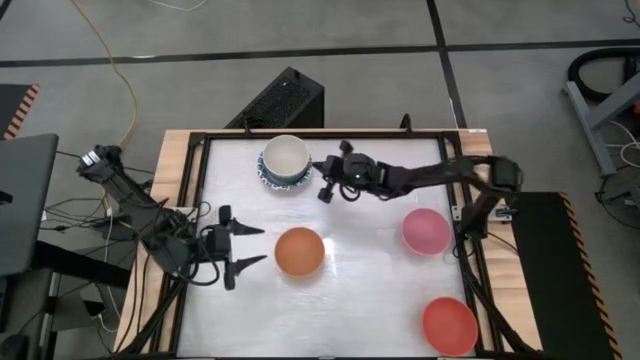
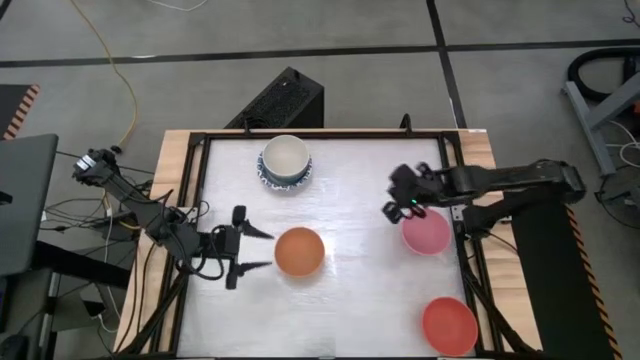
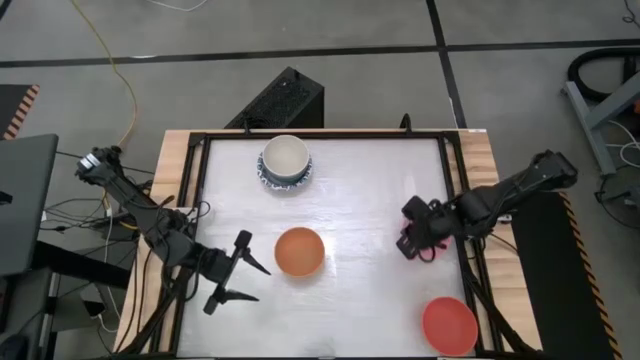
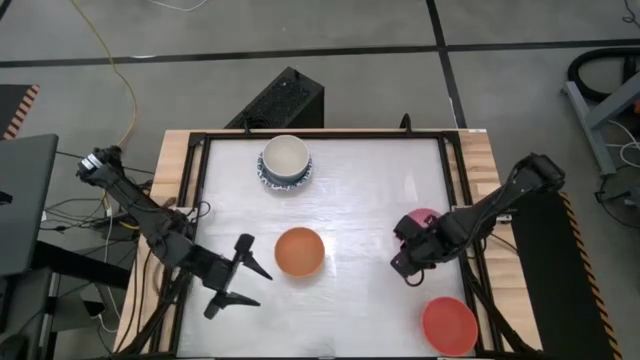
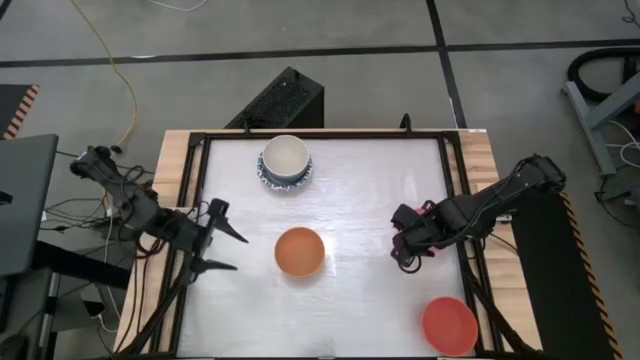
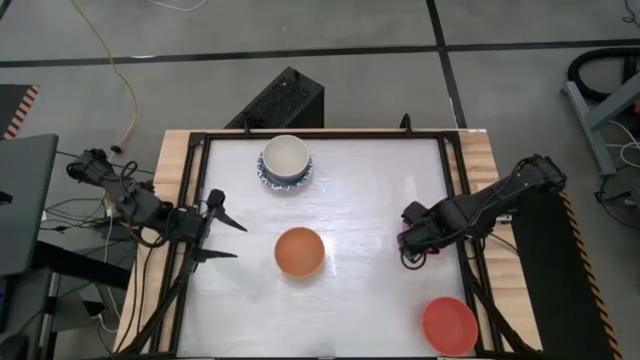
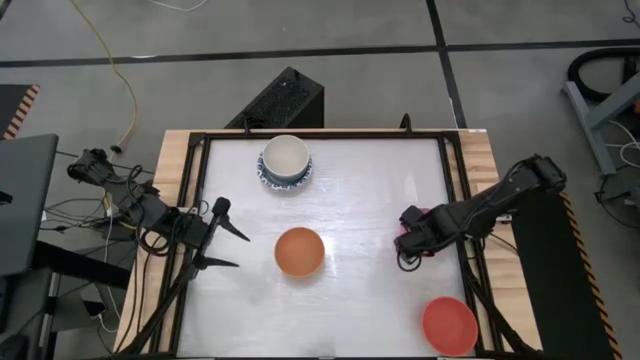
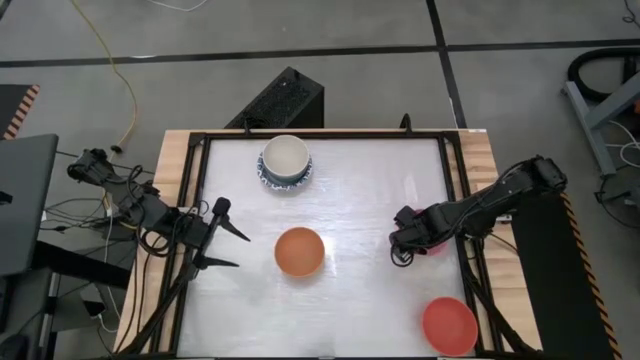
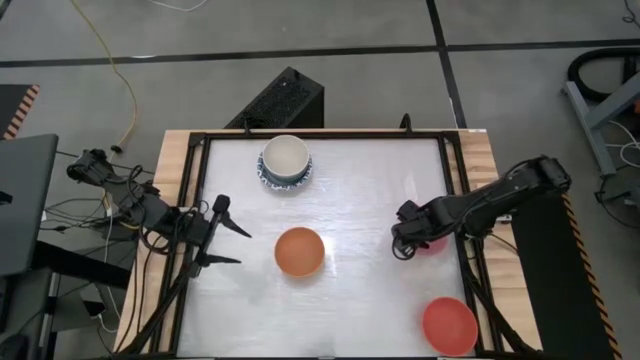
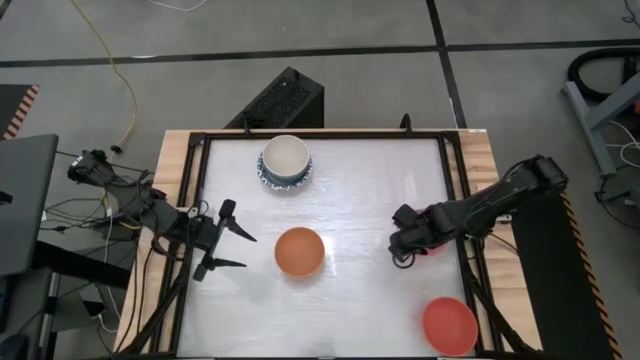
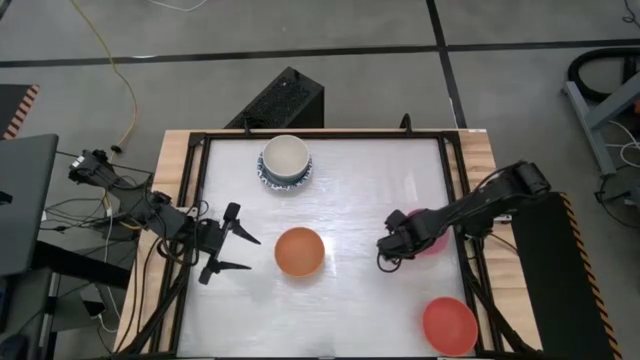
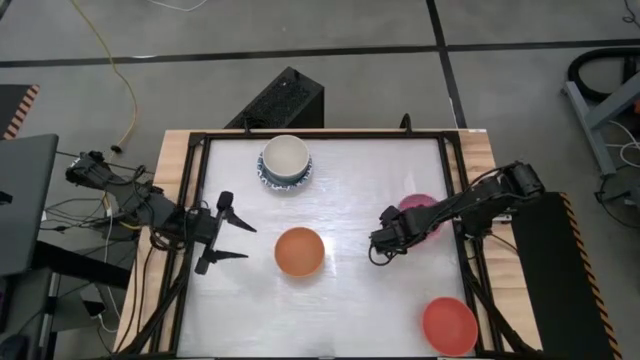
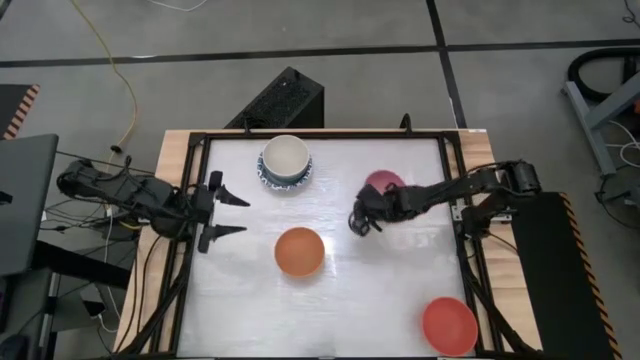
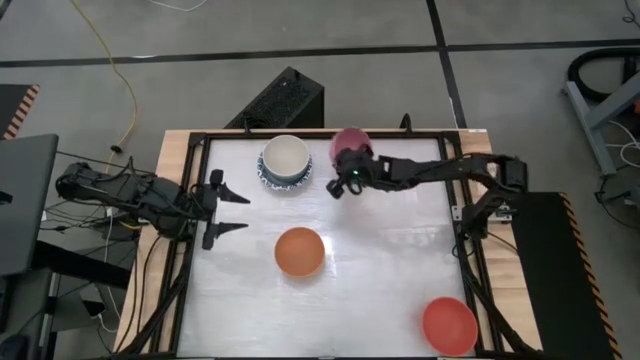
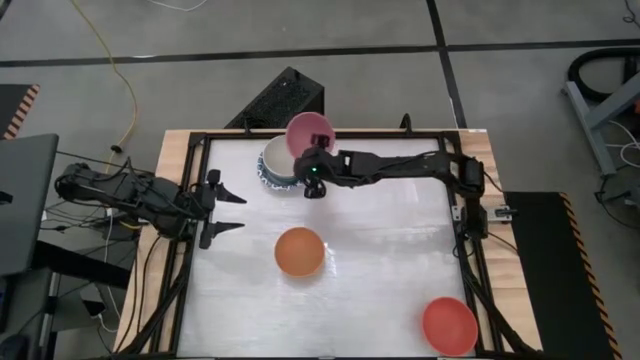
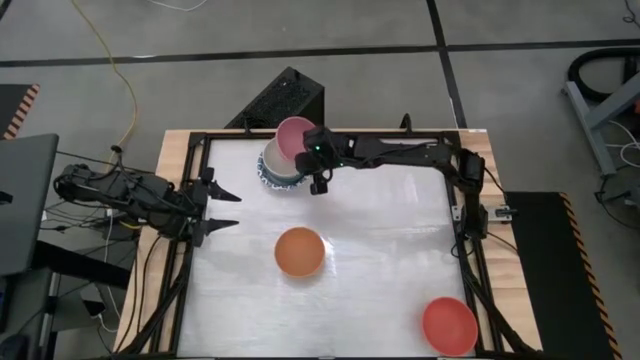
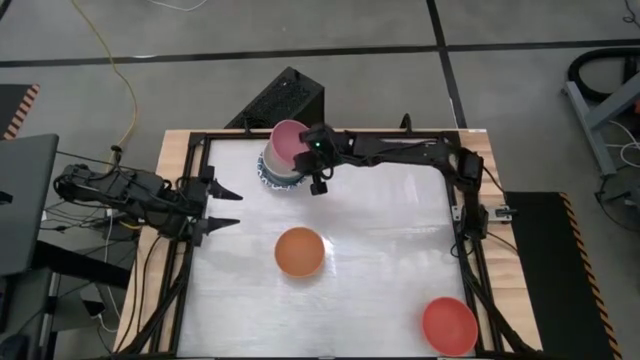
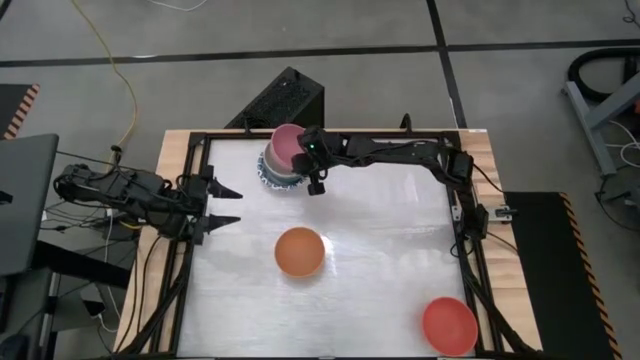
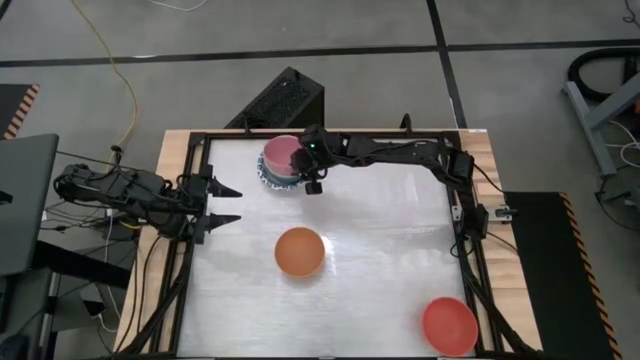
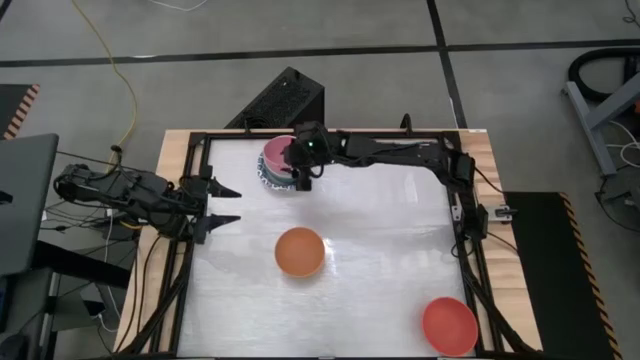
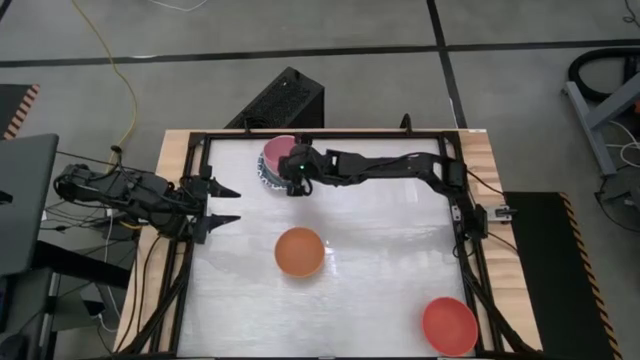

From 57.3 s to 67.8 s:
Stack the pink bowl on the white bowl

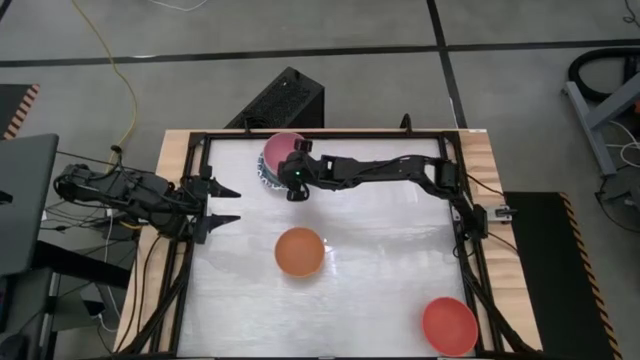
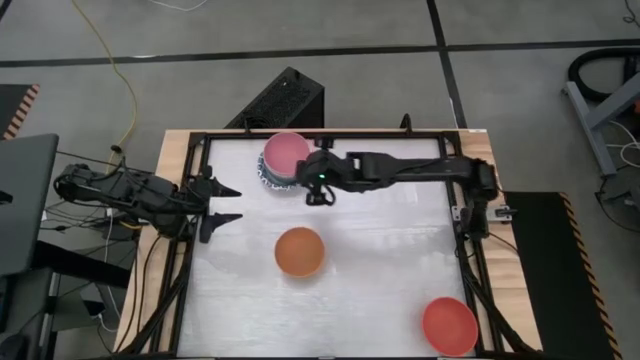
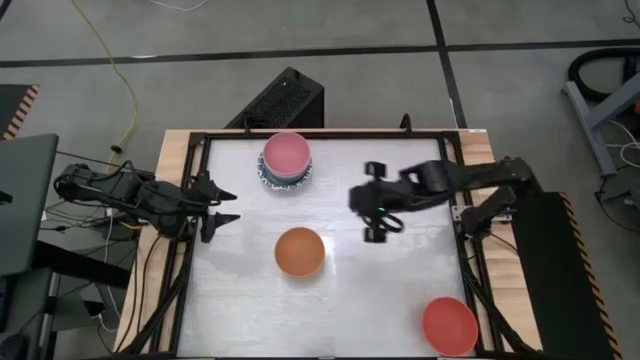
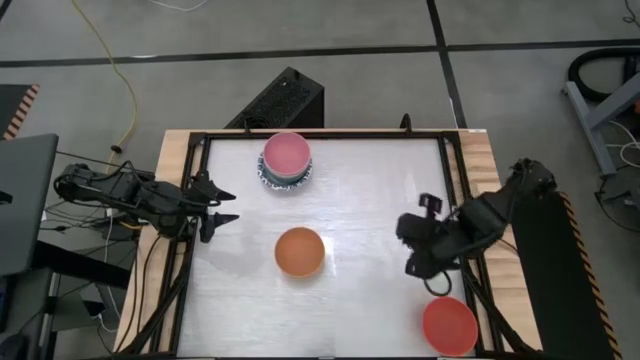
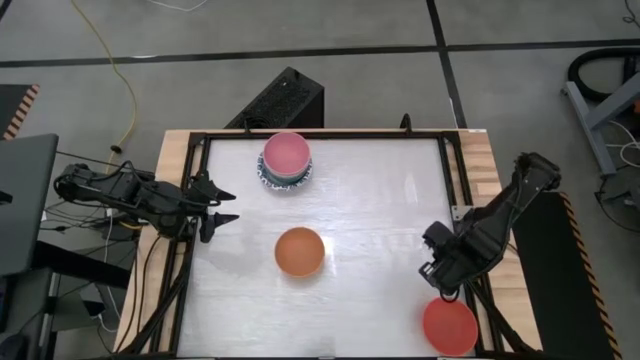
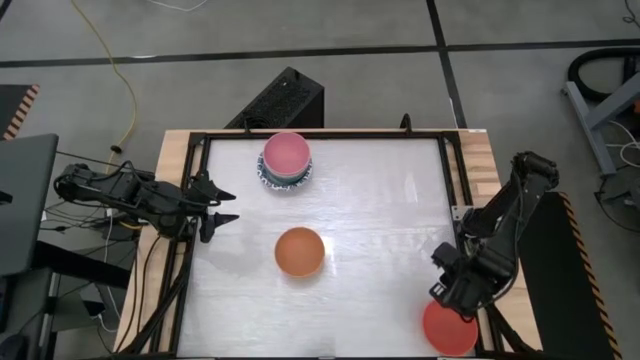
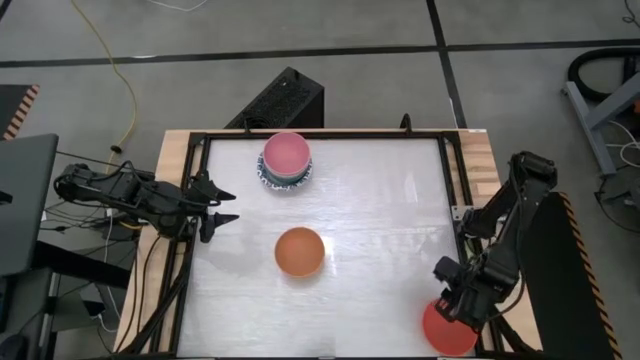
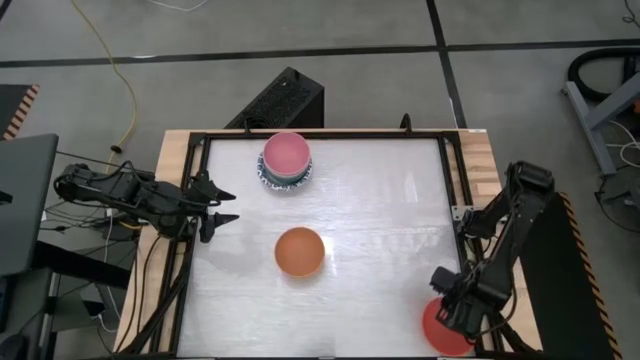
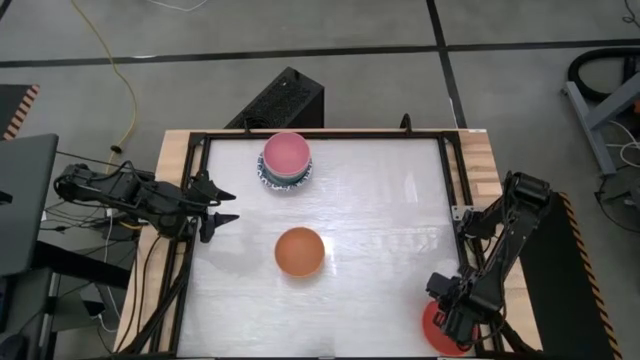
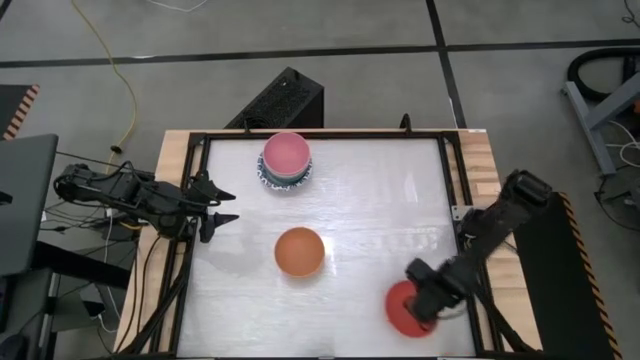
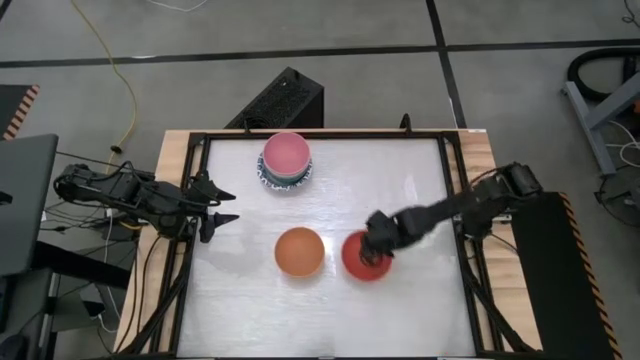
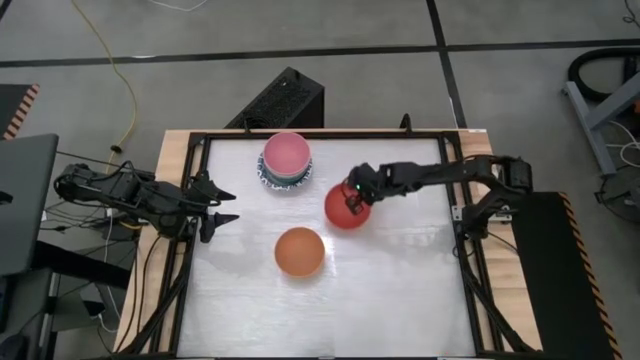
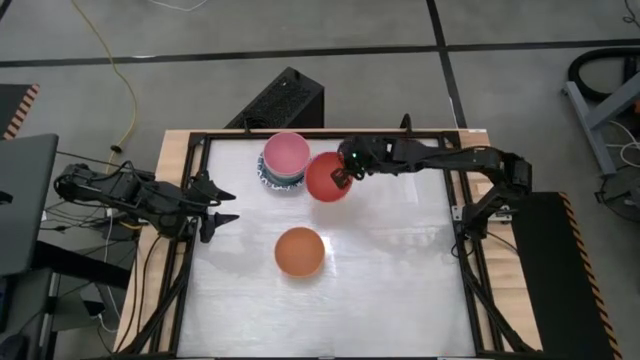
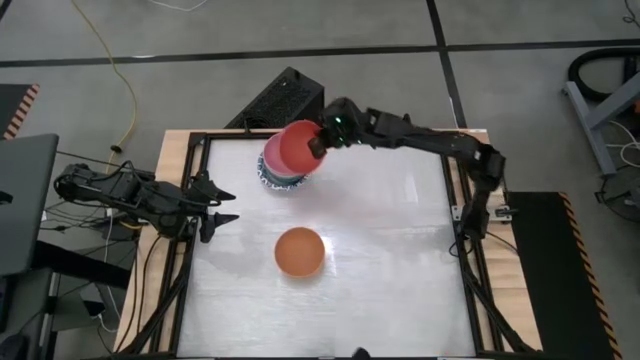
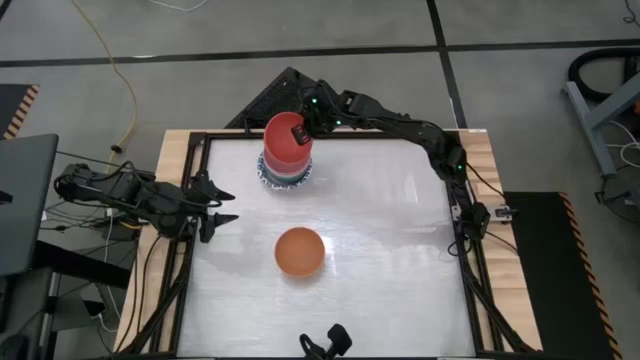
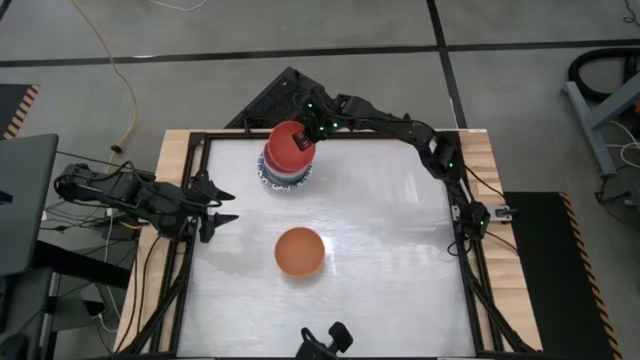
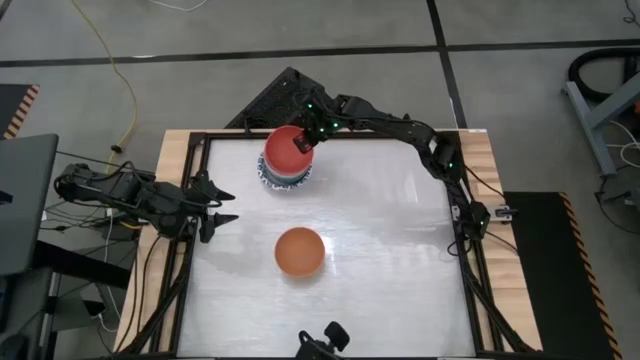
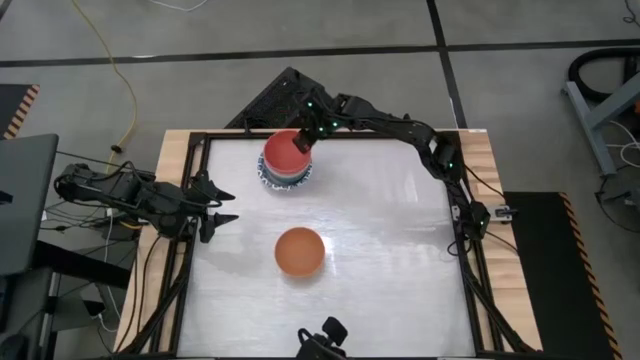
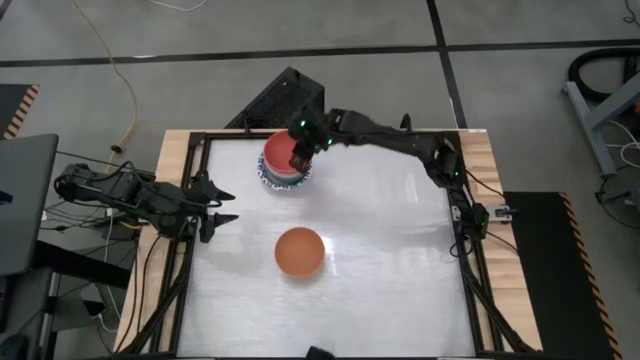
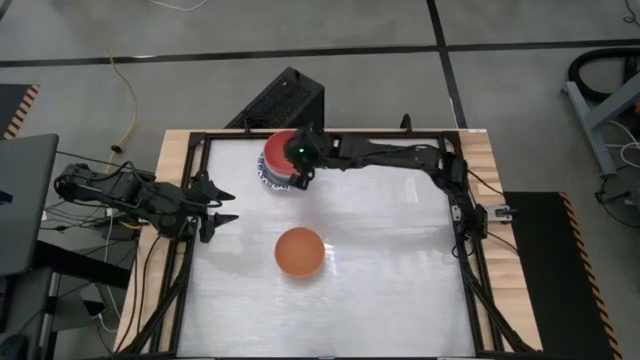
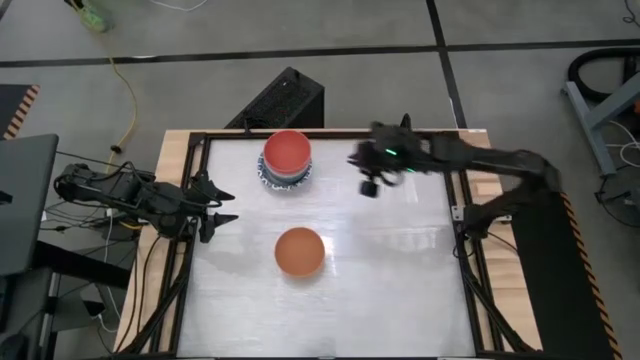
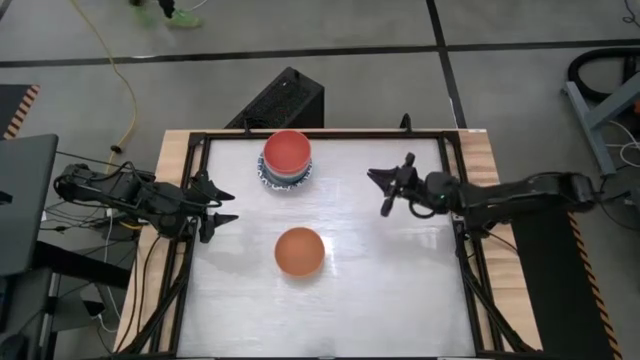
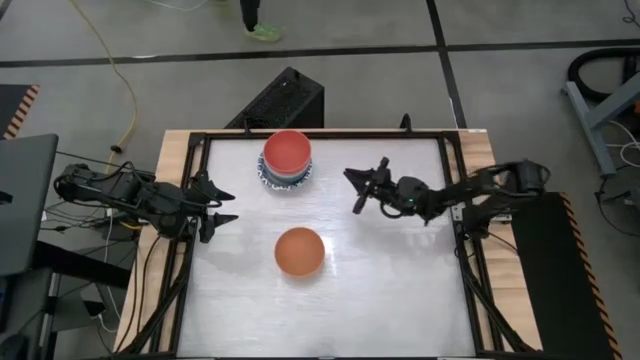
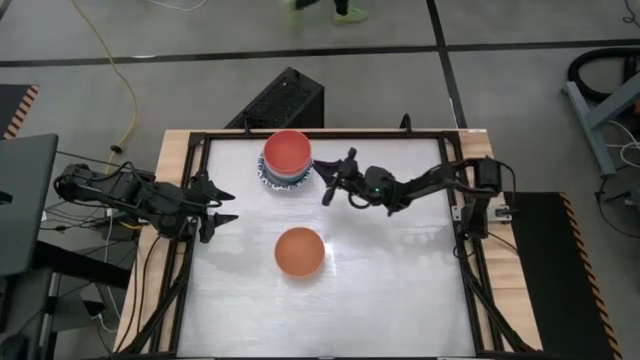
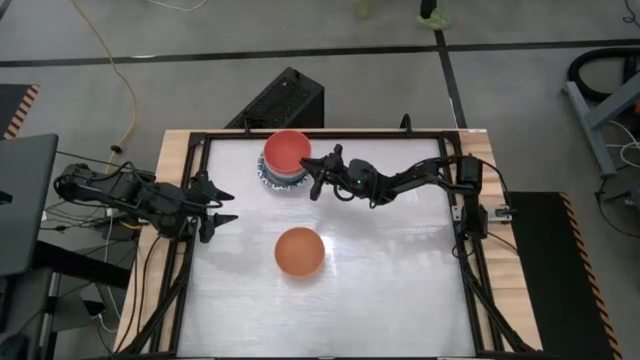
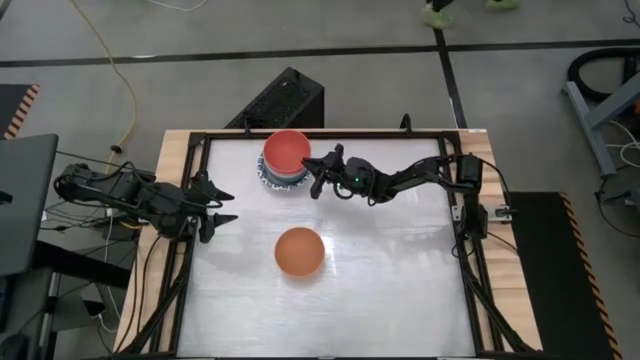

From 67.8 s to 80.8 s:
Stack the orange bowl on the pink bowl
